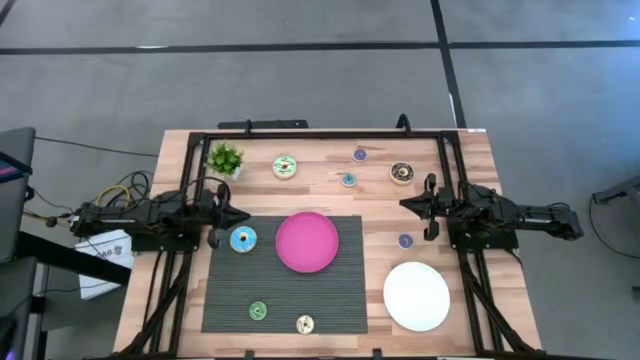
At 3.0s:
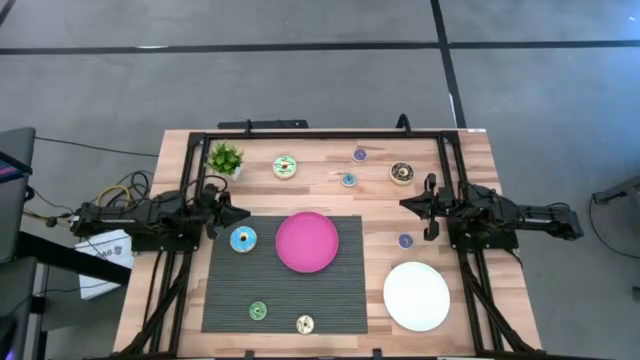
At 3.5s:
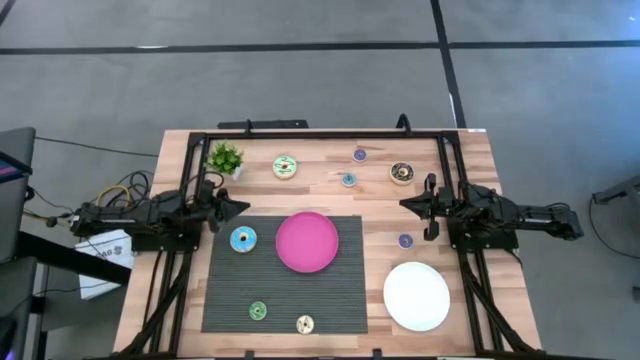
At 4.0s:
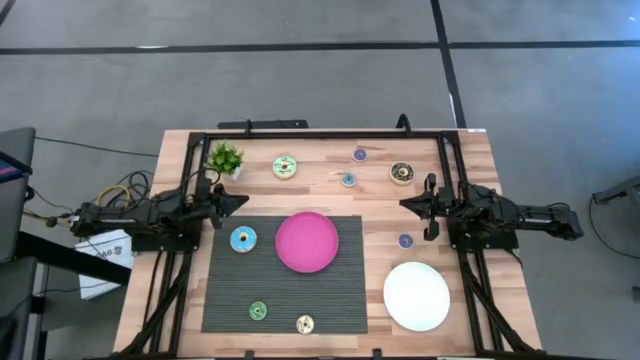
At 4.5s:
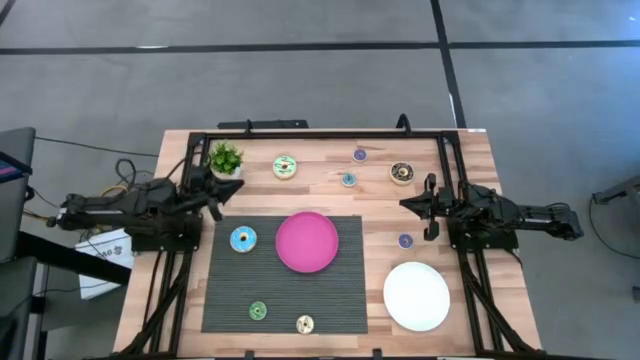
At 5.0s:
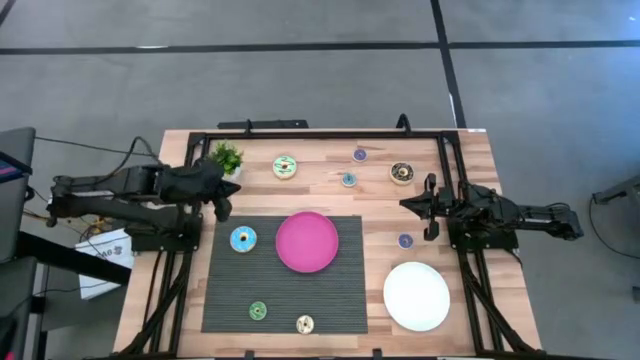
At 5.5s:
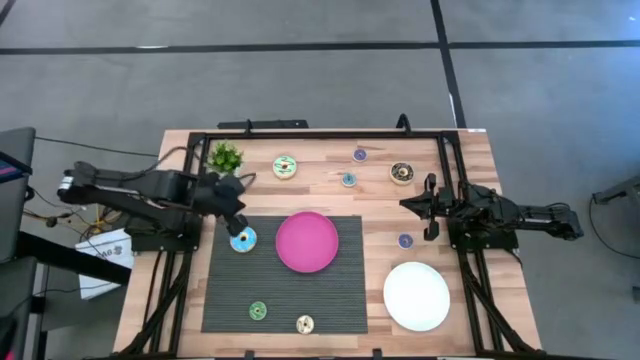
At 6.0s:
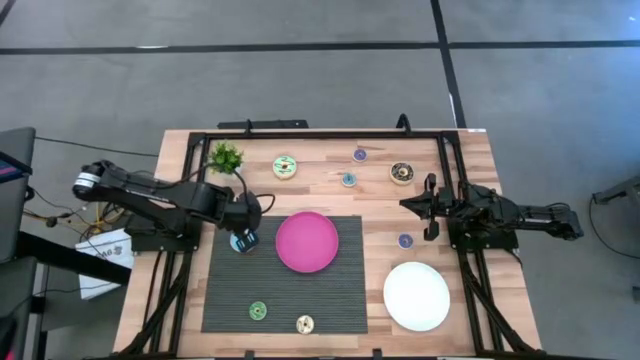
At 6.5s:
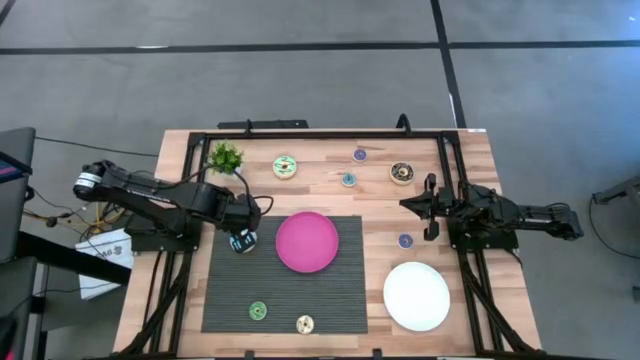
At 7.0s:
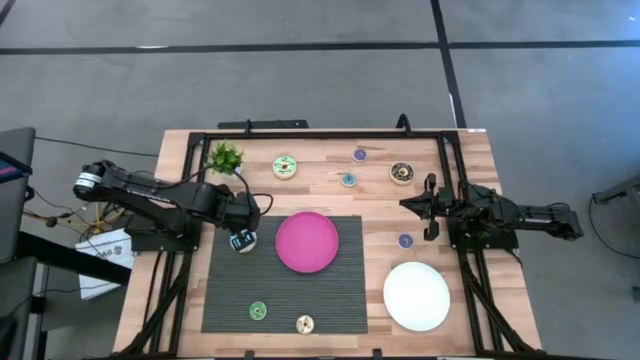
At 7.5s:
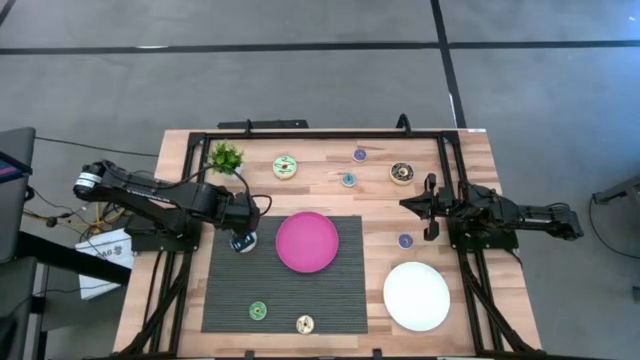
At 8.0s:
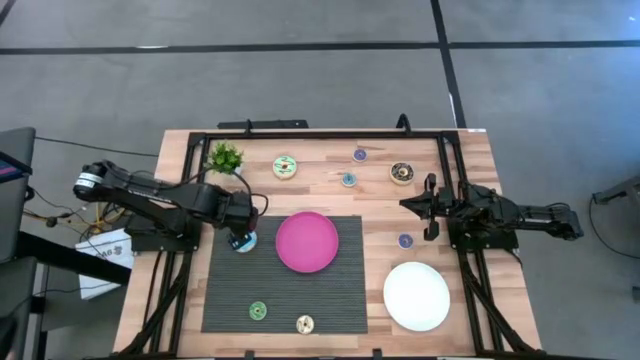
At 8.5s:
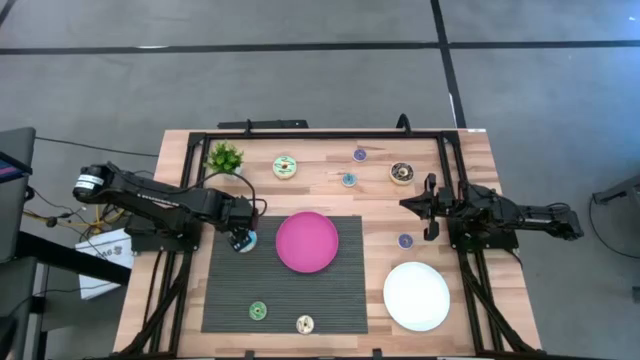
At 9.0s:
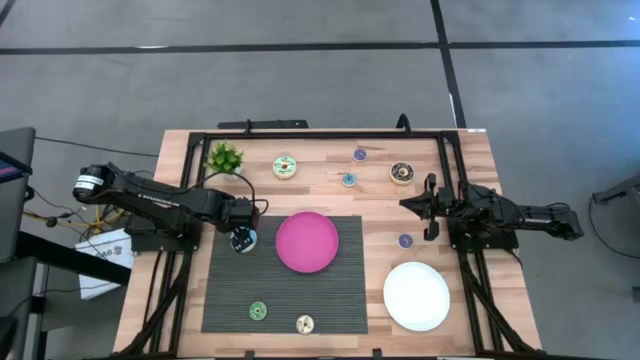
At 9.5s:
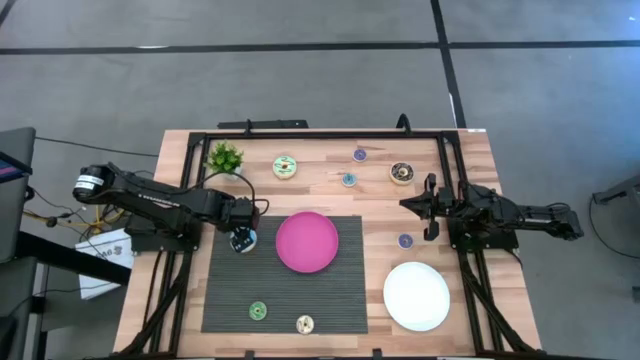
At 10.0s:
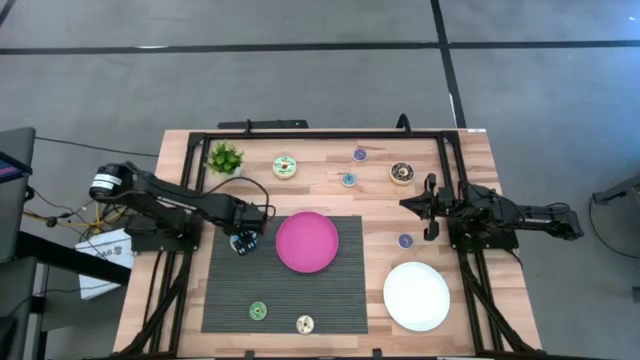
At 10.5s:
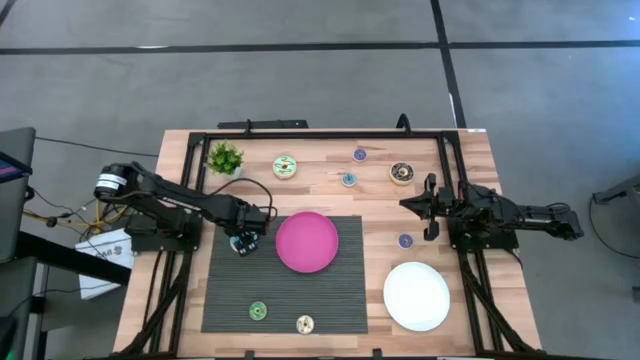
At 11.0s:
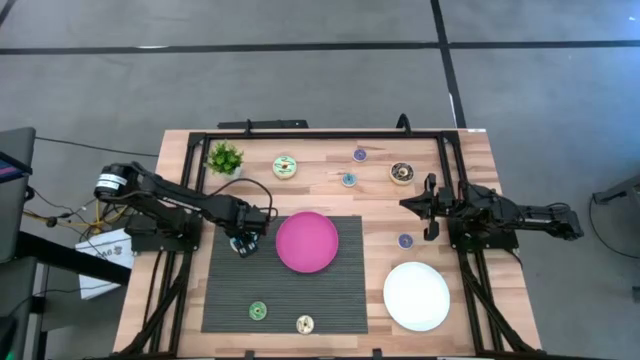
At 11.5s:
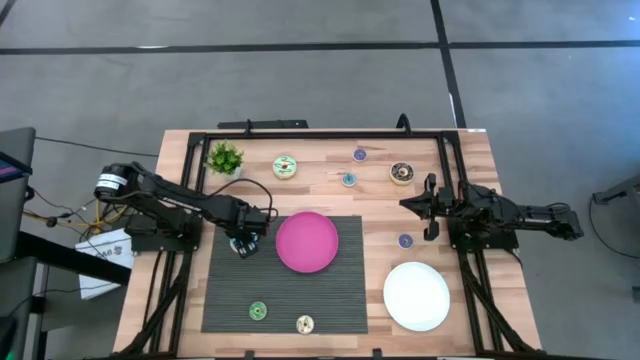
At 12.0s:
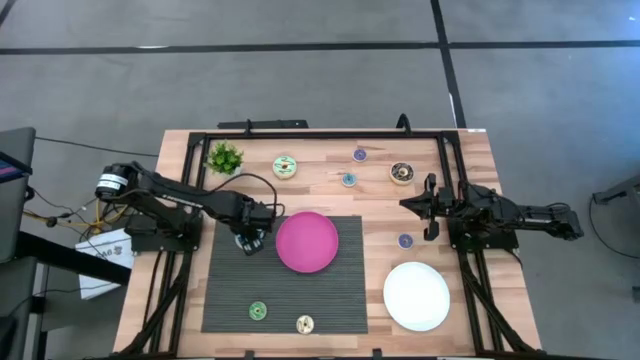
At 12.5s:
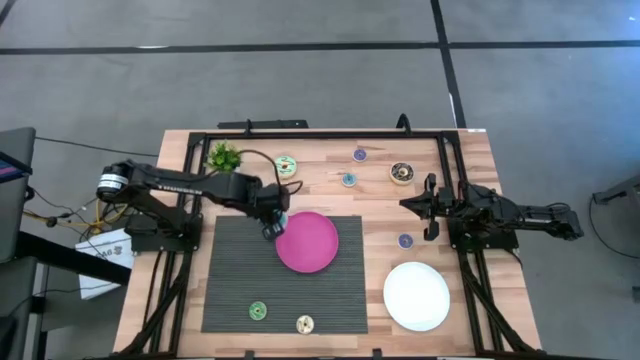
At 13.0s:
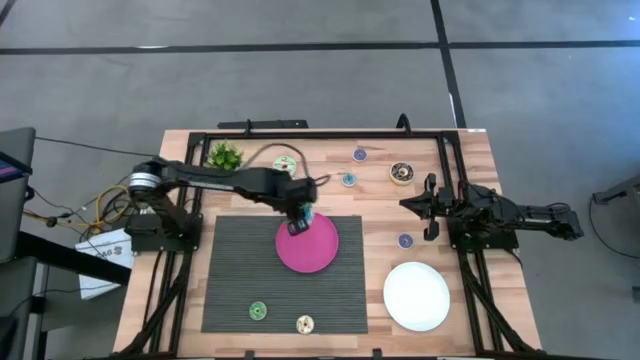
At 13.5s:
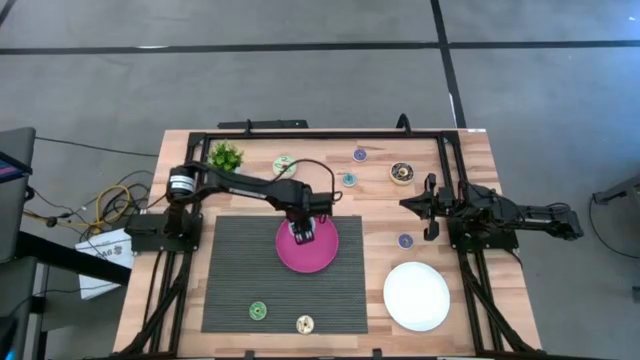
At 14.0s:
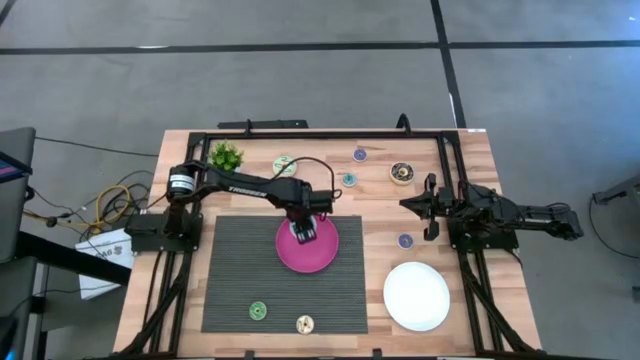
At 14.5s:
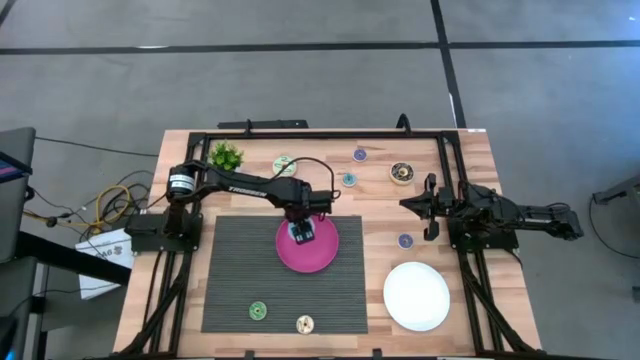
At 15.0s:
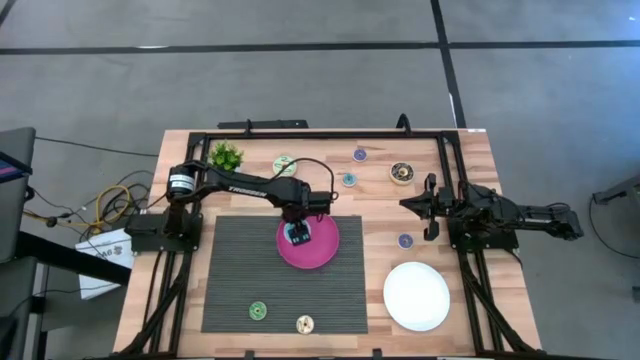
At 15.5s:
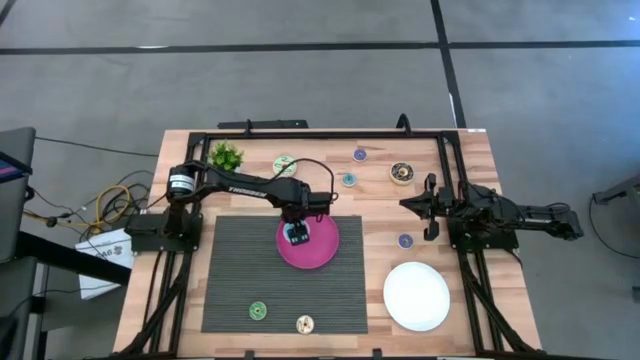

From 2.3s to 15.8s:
Task: Pick & Place donuts
Put the large blue donut on the pink plate
